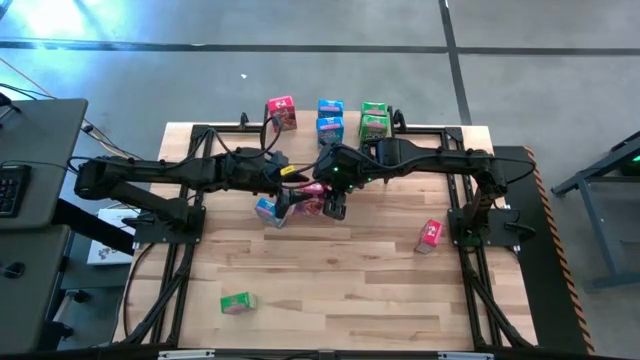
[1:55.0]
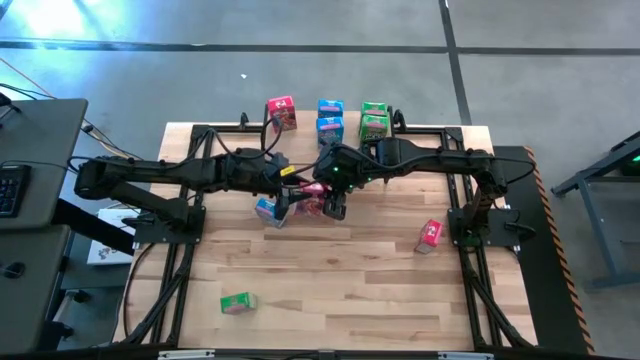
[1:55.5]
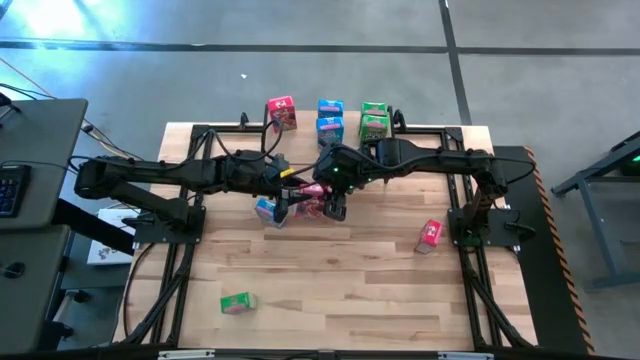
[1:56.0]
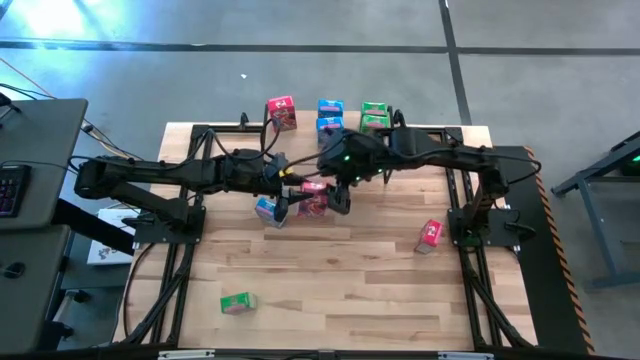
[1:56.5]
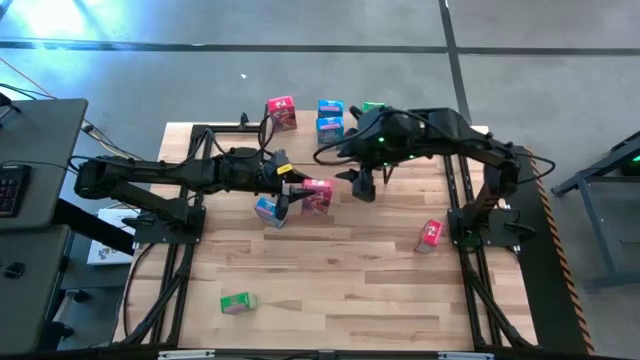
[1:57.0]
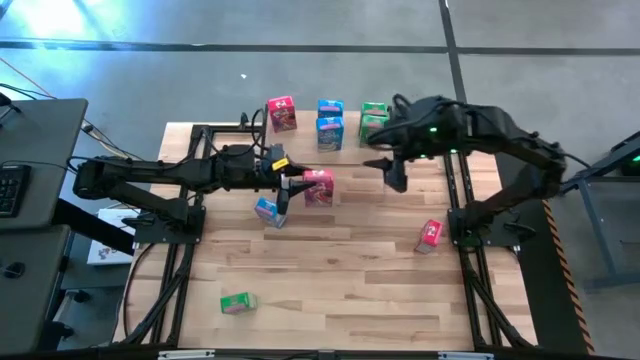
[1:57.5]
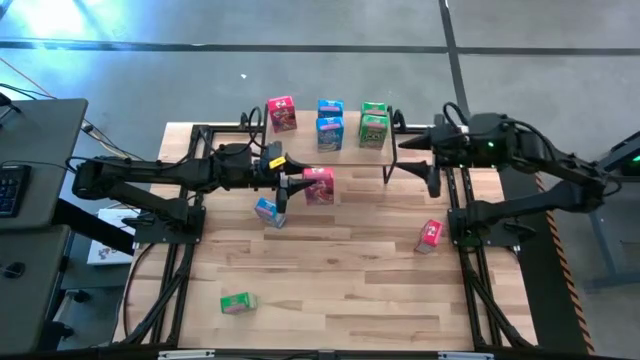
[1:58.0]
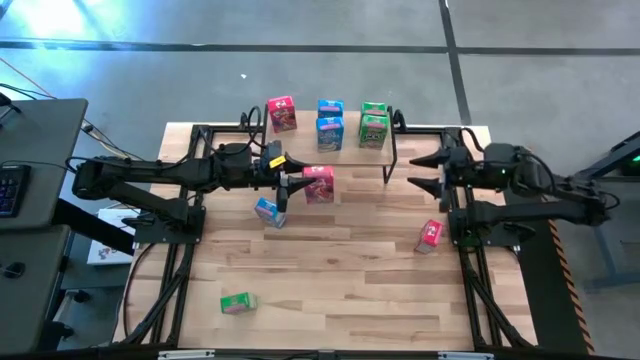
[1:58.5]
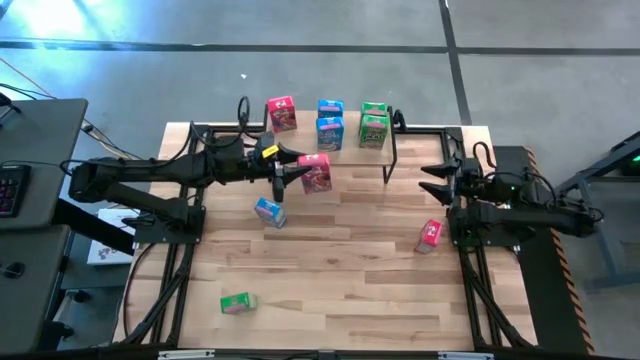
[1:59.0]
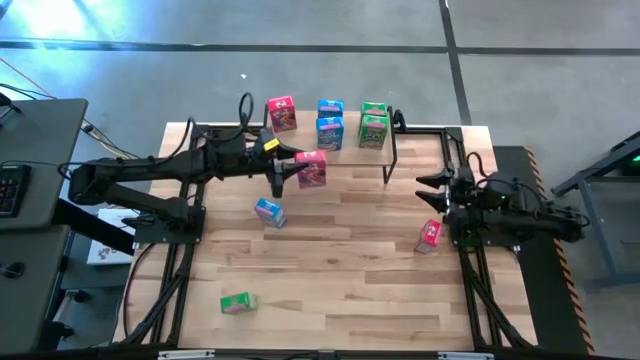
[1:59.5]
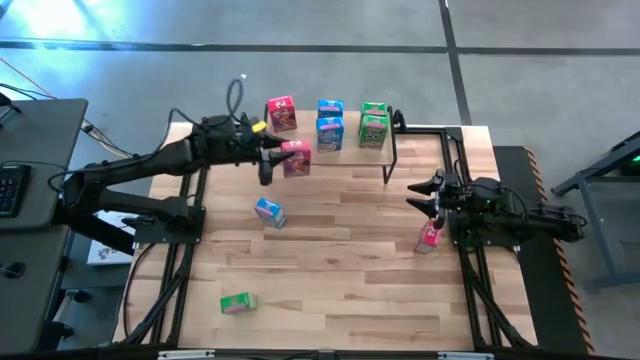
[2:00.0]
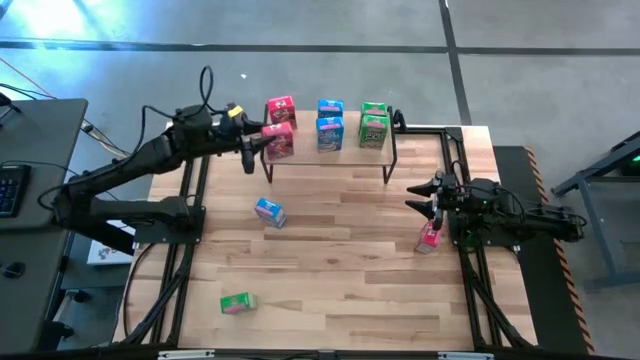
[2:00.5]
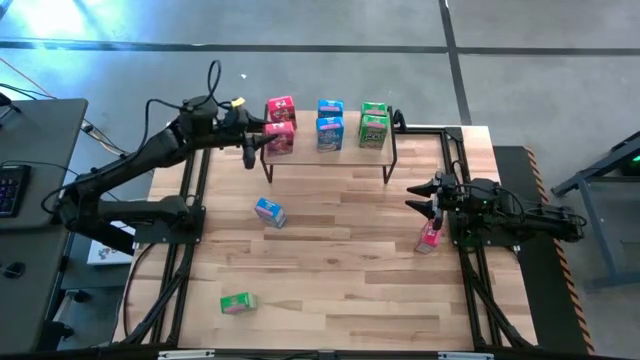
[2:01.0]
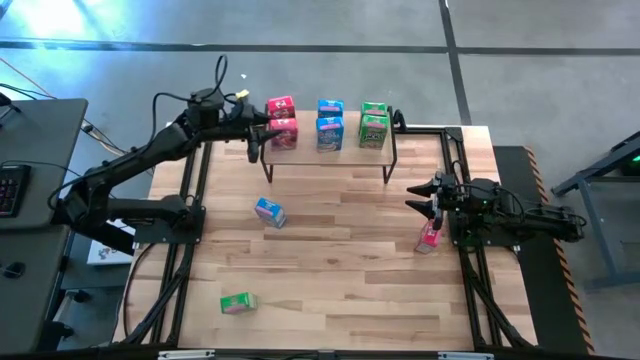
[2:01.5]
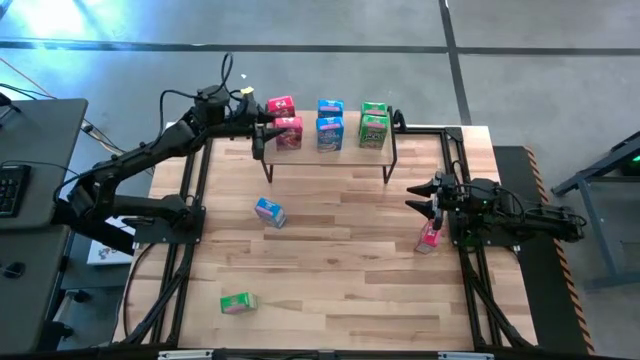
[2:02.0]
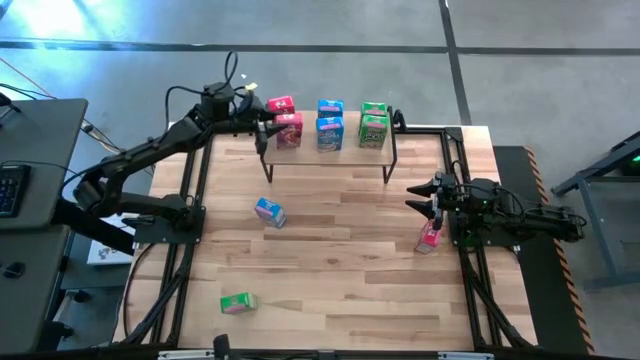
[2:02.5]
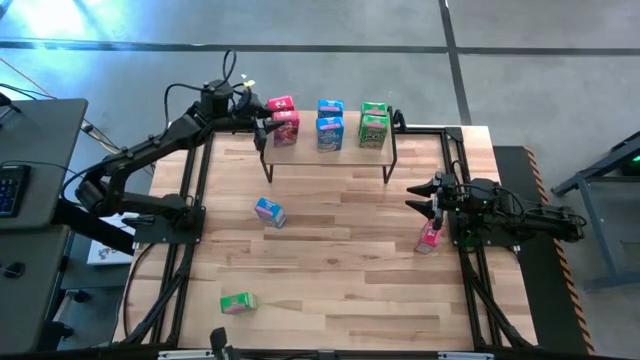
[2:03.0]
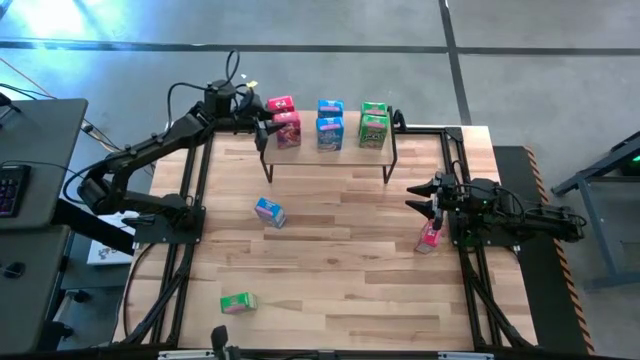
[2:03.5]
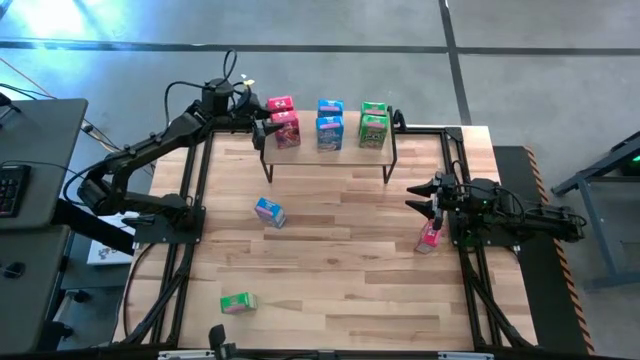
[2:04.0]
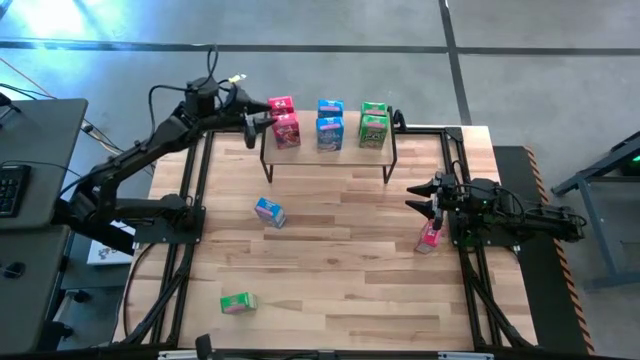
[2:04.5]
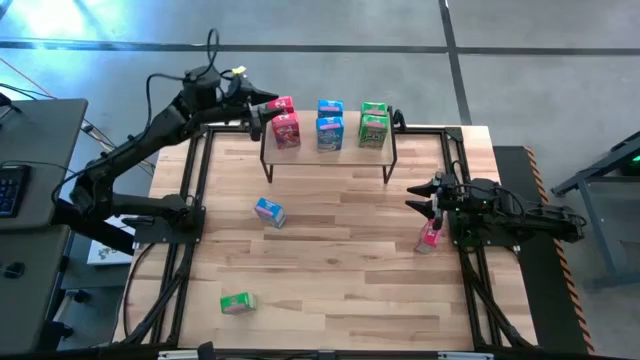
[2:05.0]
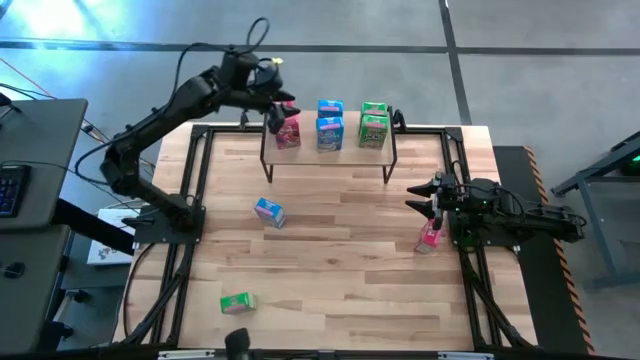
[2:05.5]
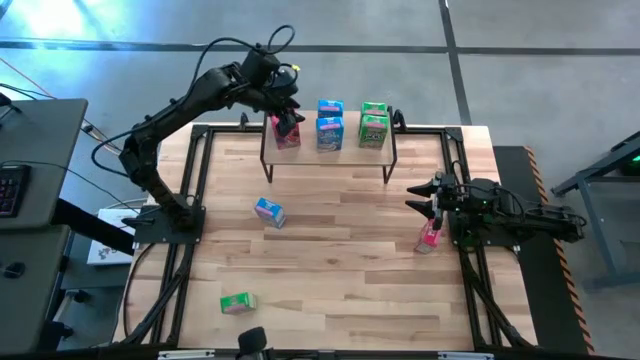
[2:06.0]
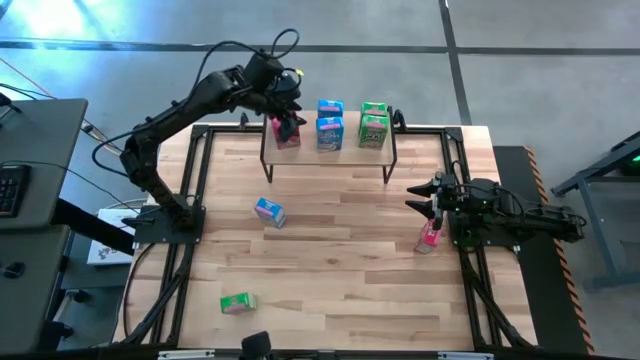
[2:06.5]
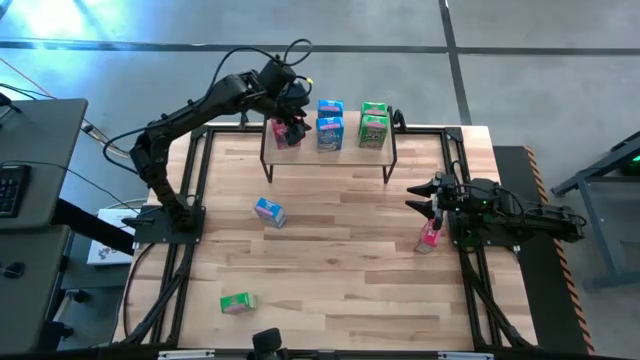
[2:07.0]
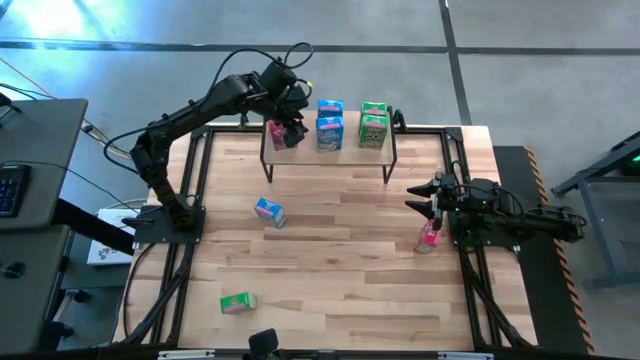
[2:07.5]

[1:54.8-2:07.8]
Task: Stack cereal on shelf
Put the red cereal box on the shelf aligned with the other red cereal box

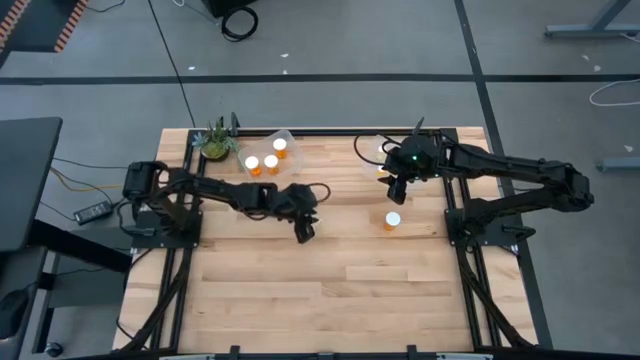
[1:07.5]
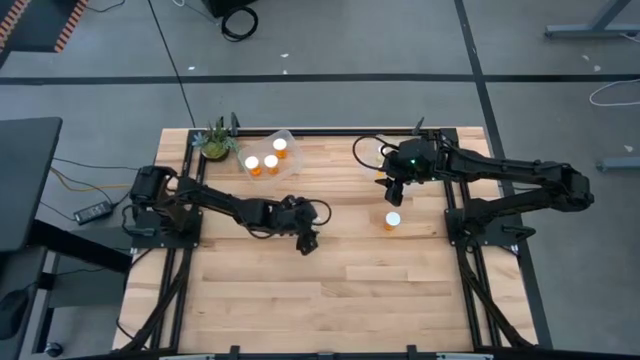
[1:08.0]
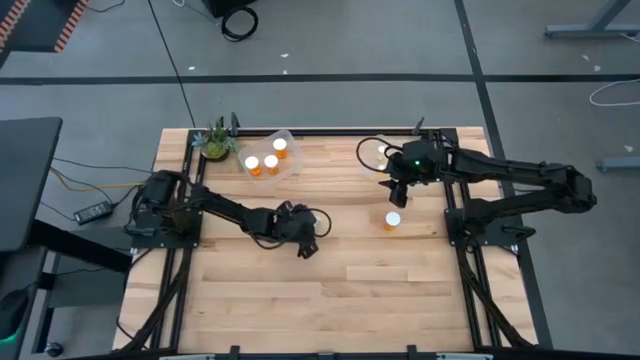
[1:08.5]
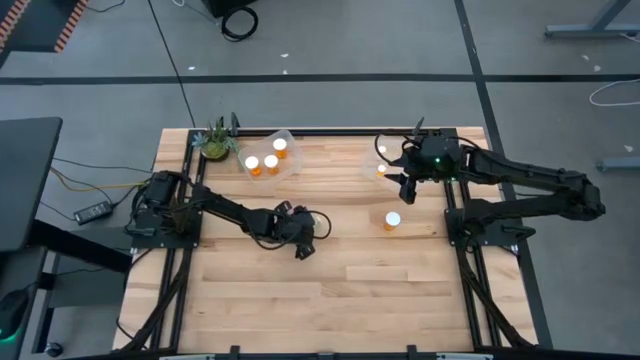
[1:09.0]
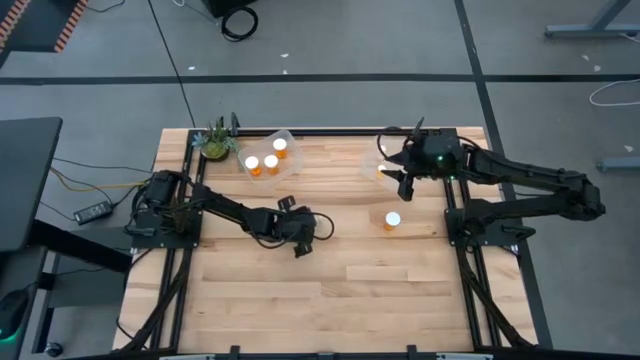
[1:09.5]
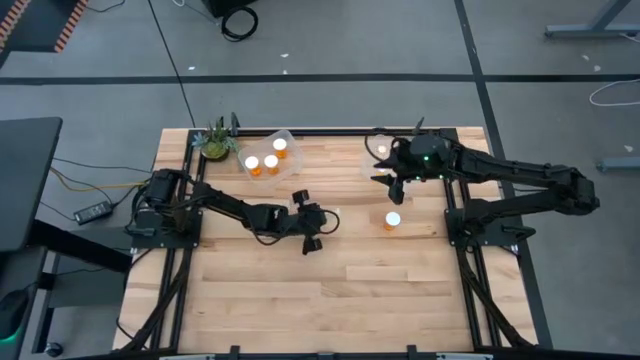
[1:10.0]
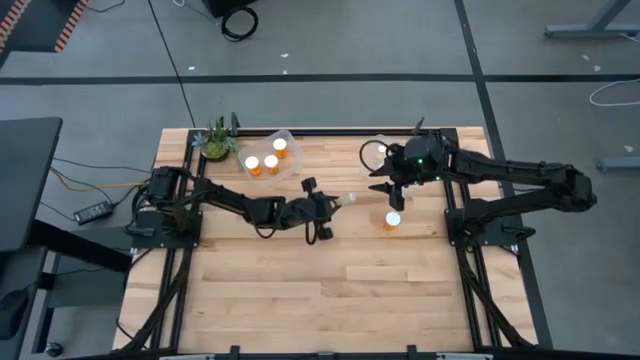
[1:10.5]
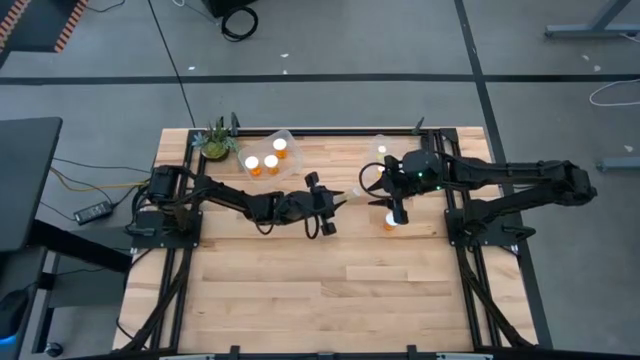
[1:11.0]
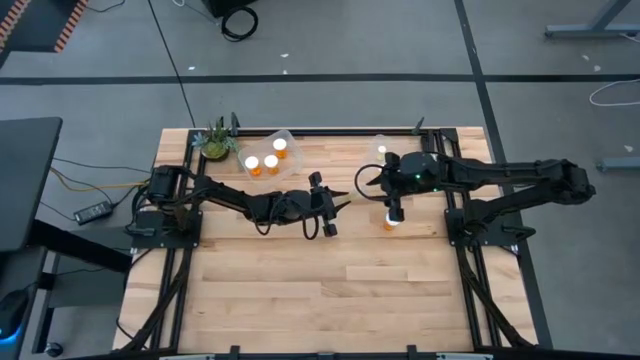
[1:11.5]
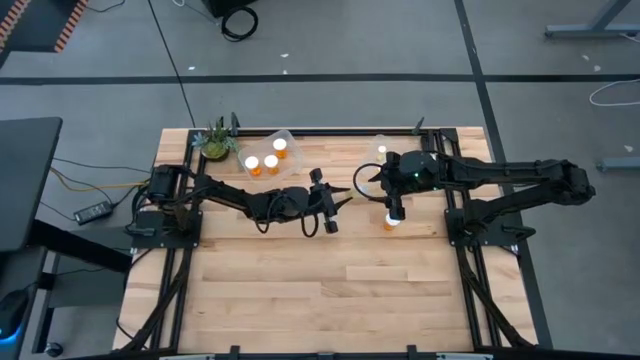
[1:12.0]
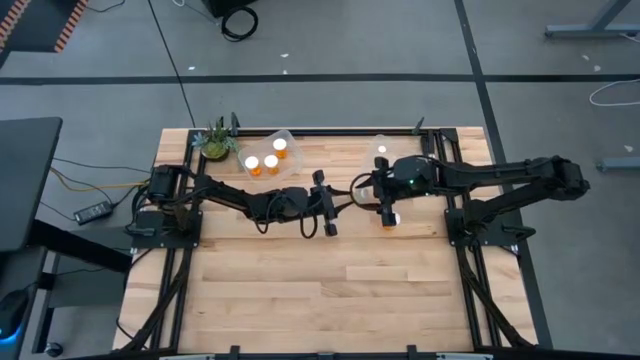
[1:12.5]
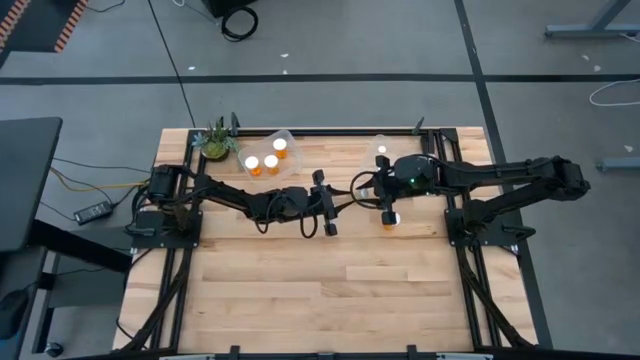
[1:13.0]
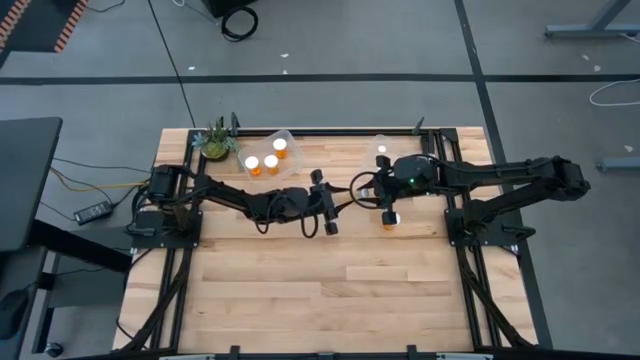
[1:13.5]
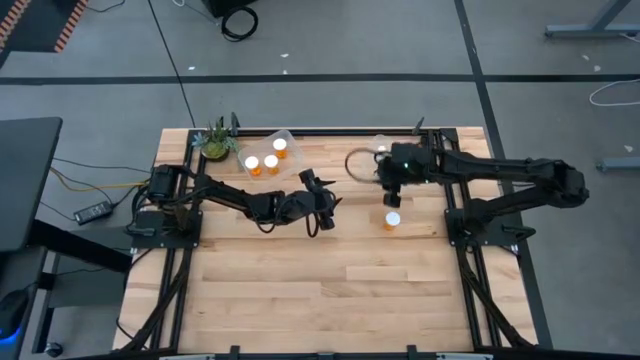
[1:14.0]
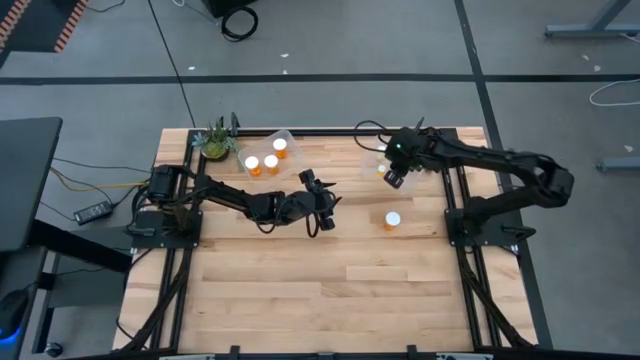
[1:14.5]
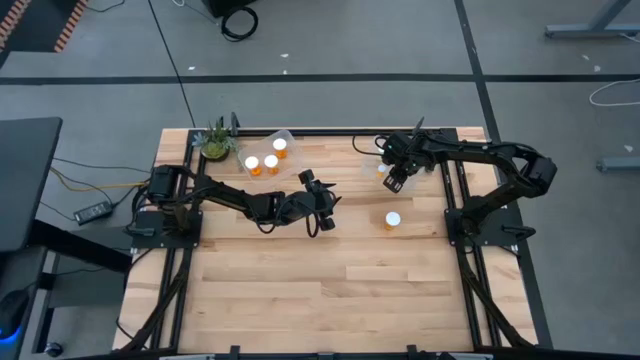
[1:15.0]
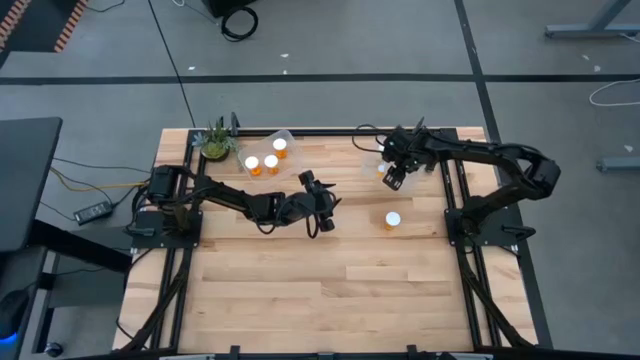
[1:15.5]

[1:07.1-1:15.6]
Task: Pick and place medicine bottles into bin by pill shape (circle, oval)
Put the yellow tablet bottle into the right transparent bin
